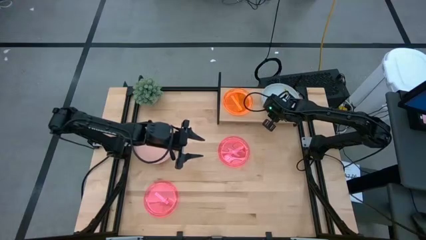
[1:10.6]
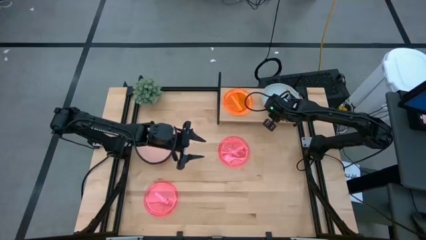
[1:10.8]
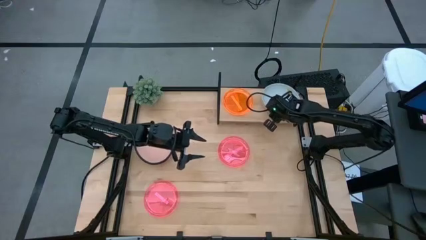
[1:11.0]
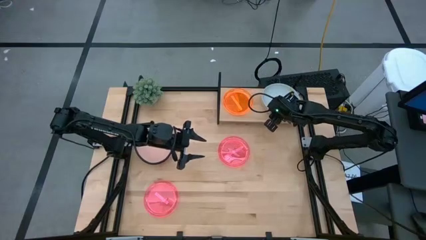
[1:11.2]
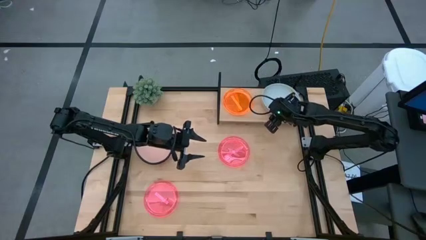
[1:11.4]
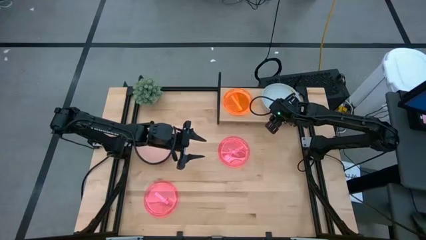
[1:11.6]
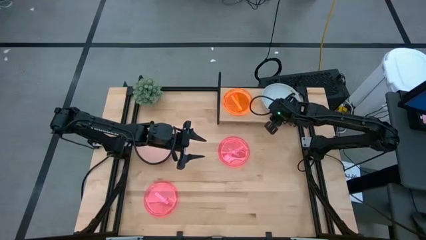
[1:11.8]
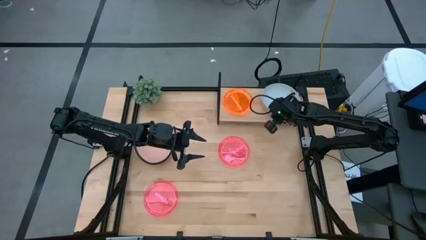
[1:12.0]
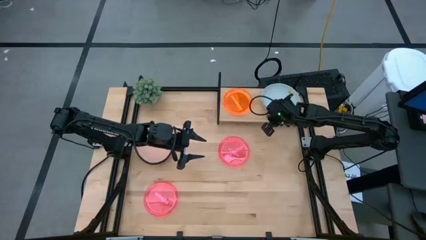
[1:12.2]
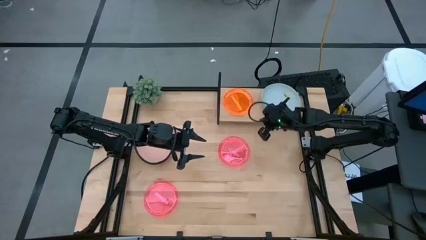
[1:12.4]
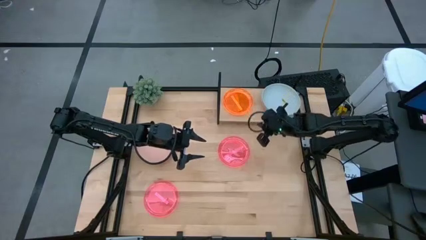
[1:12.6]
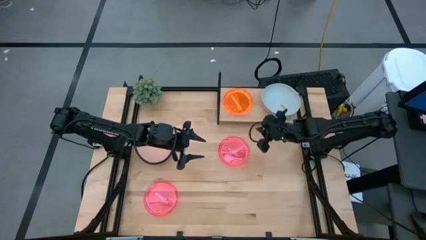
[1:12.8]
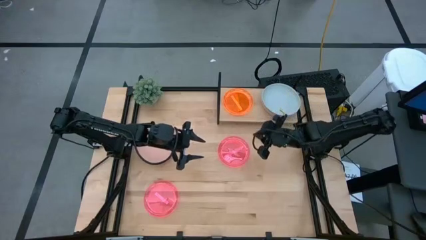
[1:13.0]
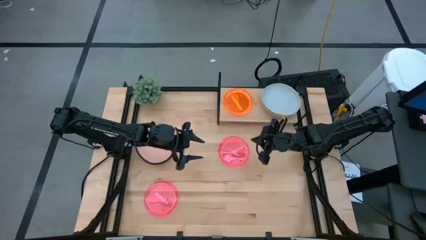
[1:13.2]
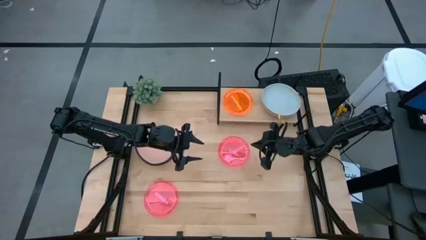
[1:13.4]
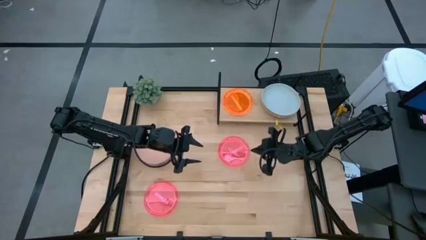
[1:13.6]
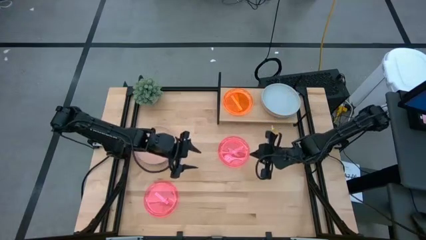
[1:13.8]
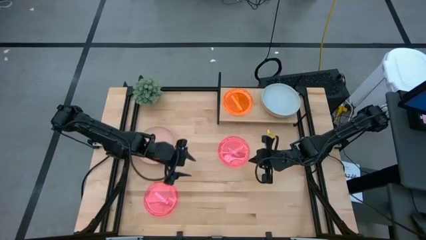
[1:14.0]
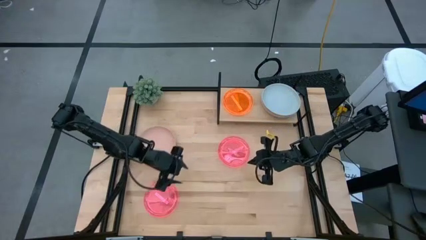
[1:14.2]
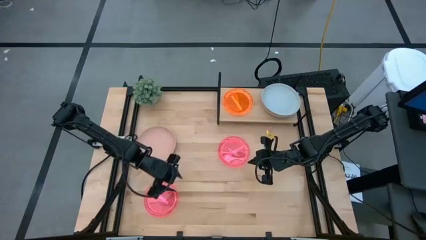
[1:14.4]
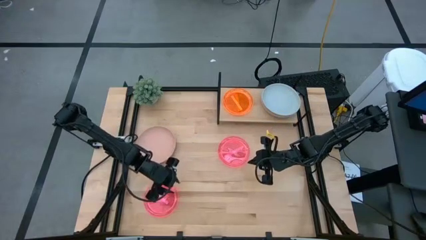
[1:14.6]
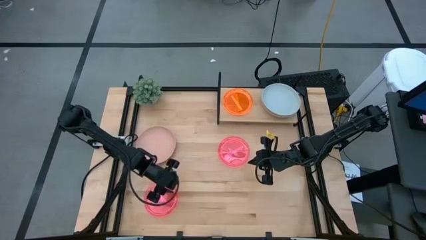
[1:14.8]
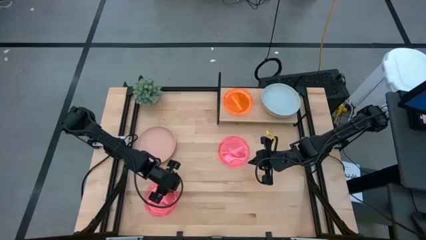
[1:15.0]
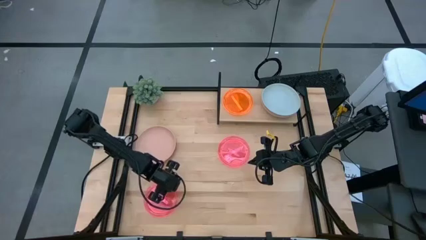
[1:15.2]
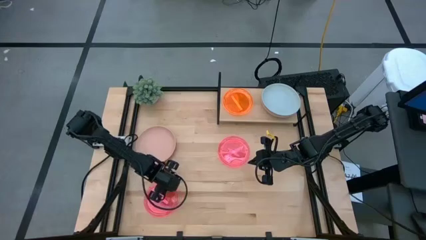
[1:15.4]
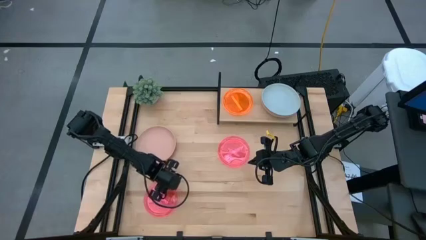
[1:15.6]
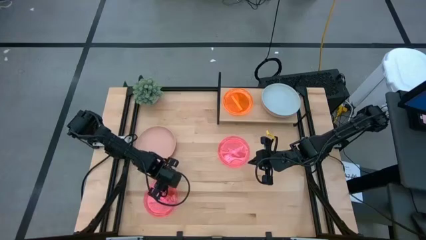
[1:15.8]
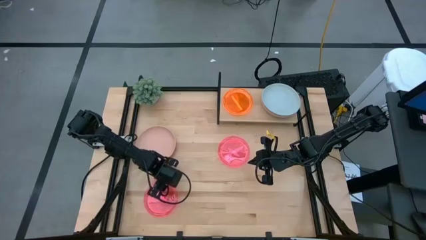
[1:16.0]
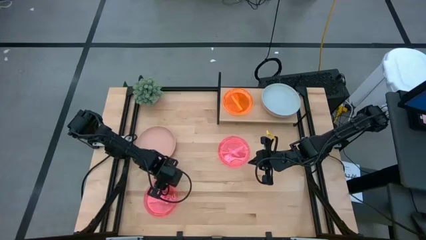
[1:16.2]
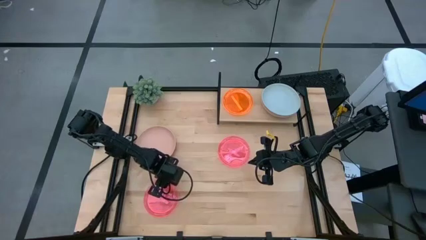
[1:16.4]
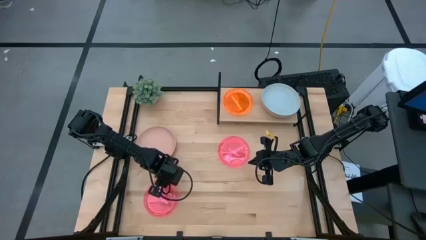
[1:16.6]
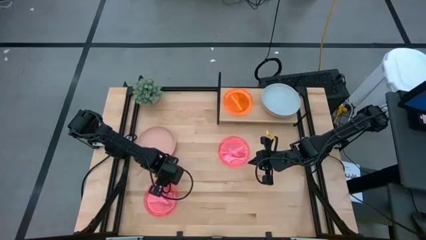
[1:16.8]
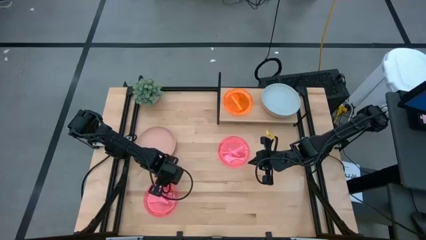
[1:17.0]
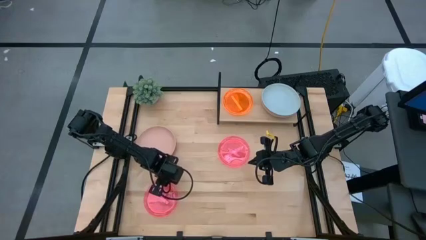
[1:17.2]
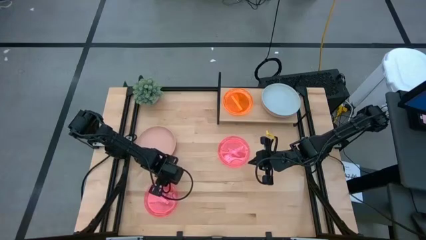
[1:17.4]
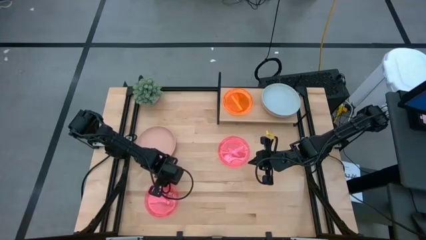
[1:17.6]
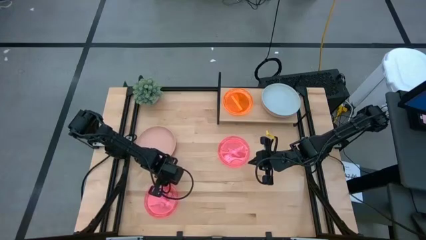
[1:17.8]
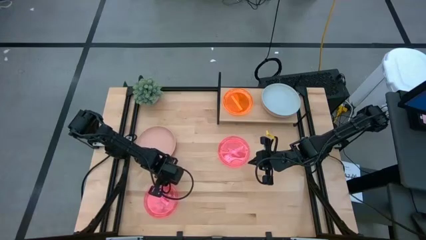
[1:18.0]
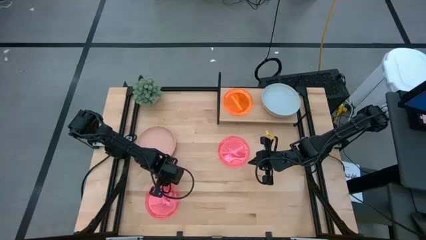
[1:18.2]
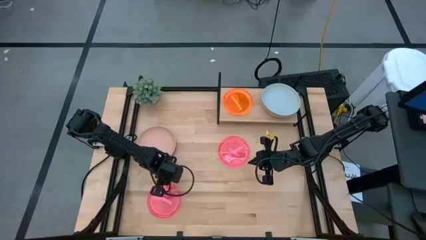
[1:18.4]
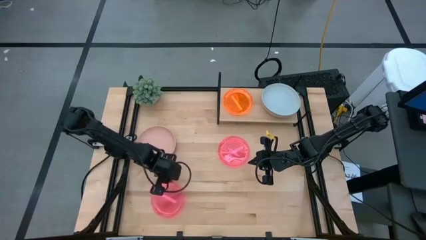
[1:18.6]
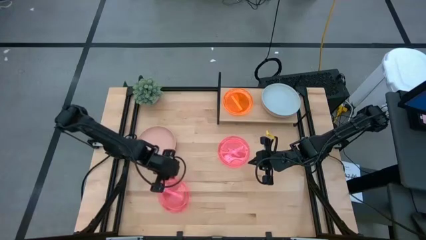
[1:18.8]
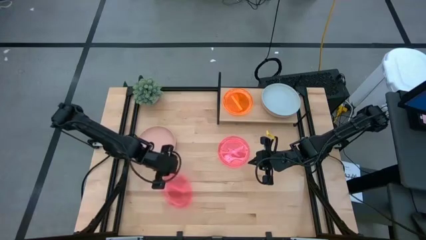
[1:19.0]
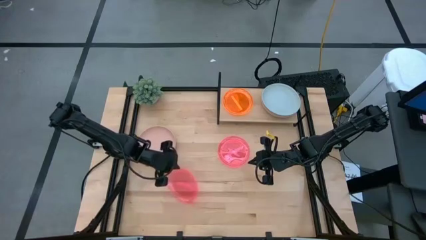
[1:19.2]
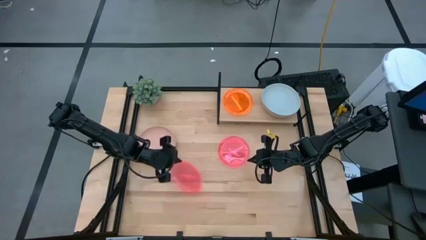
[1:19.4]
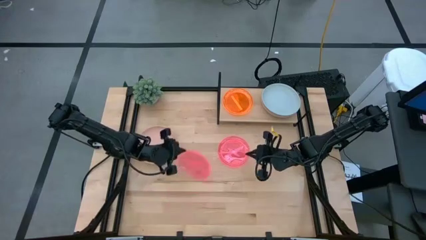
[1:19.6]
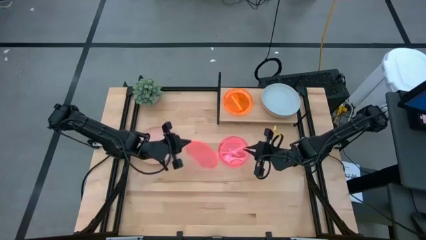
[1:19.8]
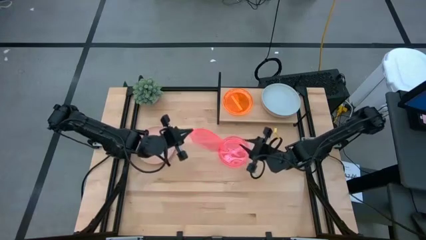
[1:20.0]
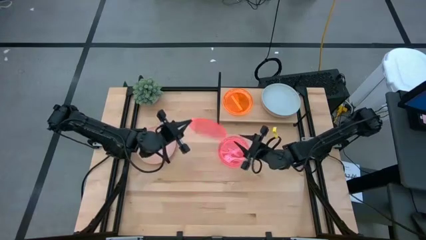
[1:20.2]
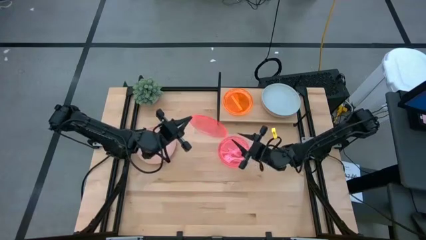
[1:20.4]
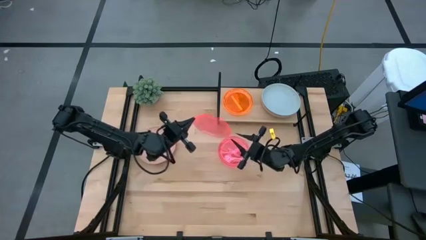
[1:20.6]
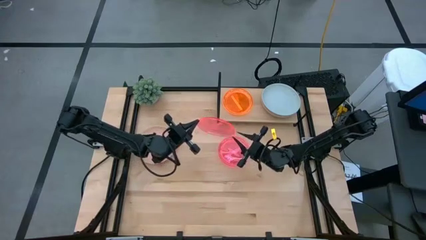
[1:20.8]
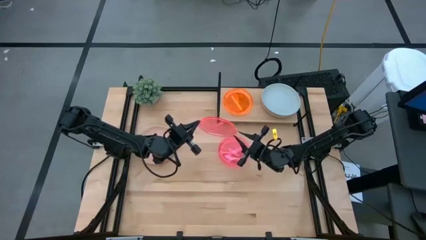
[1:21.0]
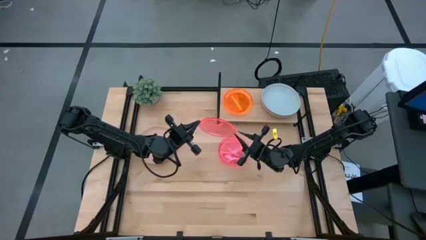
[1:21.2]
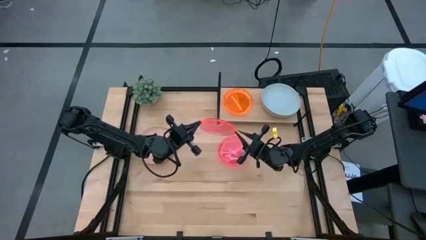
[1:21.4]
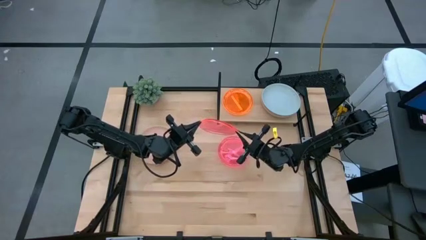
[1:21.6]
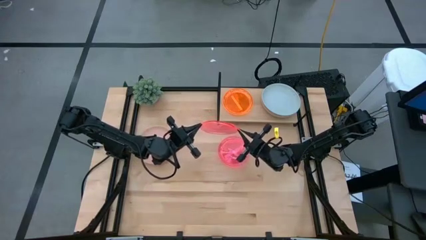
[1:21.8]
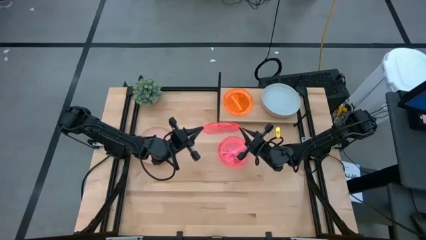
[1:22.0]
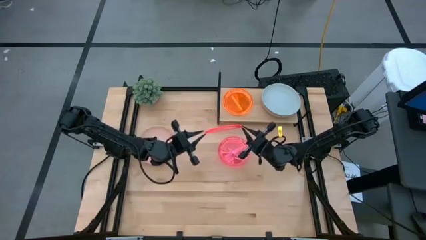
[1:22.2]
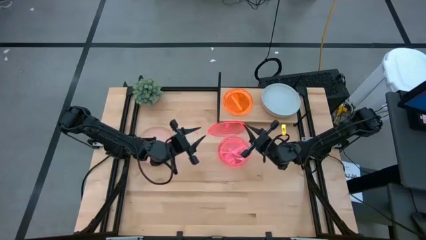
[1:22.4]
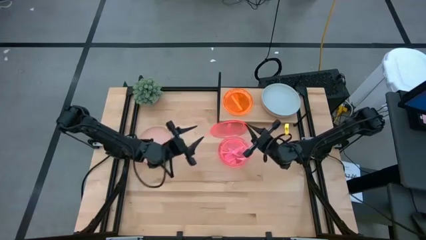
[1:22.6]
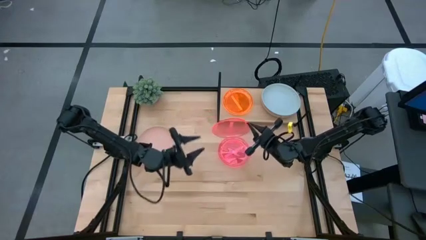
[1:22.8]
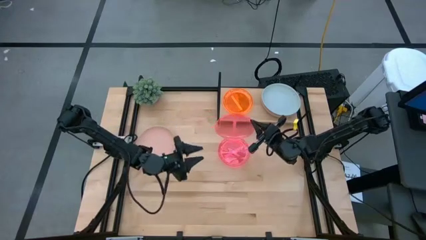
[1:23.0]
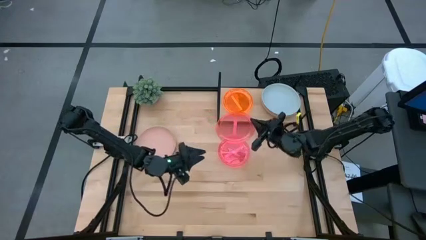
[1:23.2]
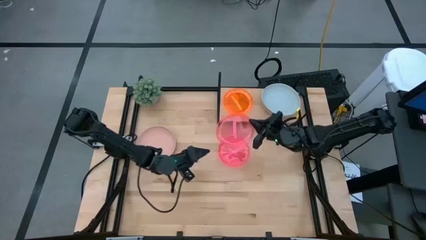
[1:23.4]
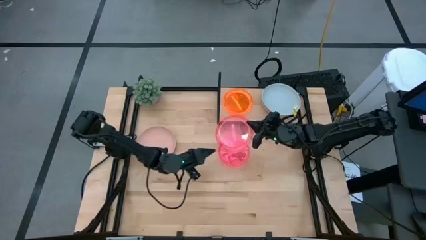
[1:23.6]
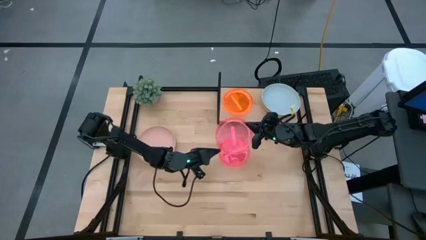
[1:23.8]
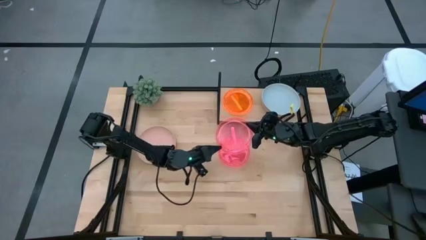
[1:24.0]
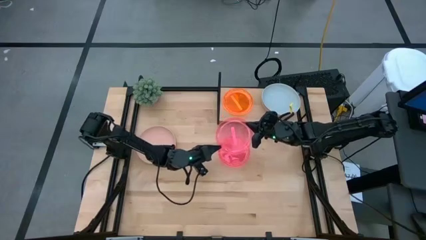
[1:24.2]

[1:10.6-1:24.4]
Task: Place and stack plates onto a shelf
Stack the bottom pink plate on top of the orange plate on the shelf

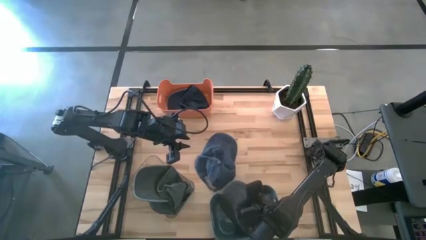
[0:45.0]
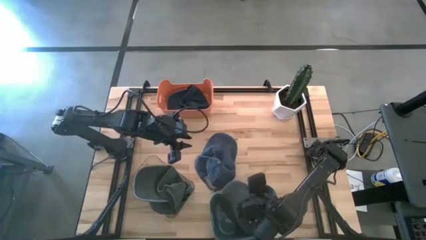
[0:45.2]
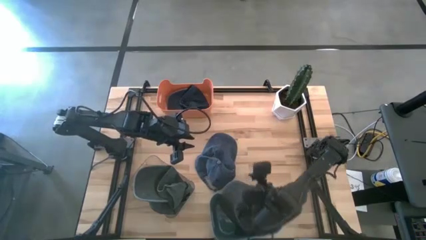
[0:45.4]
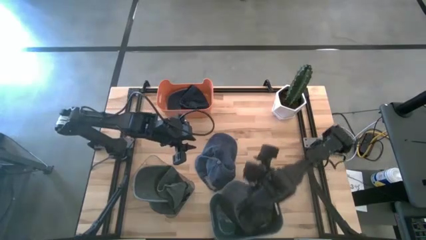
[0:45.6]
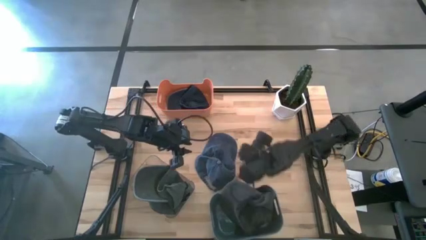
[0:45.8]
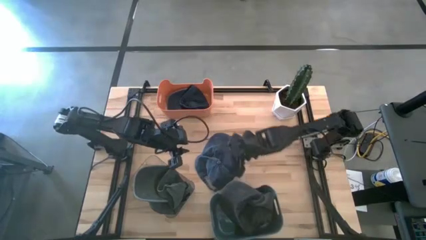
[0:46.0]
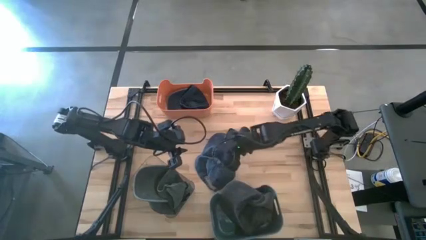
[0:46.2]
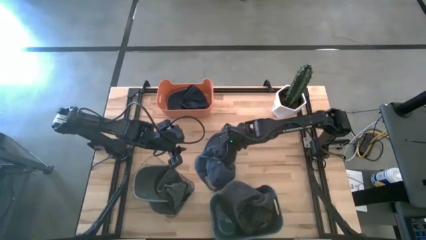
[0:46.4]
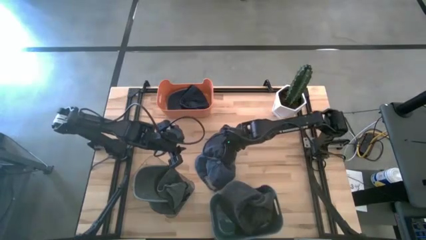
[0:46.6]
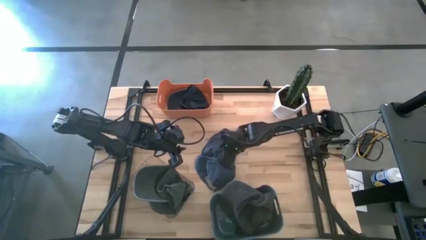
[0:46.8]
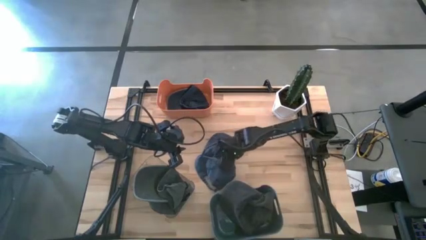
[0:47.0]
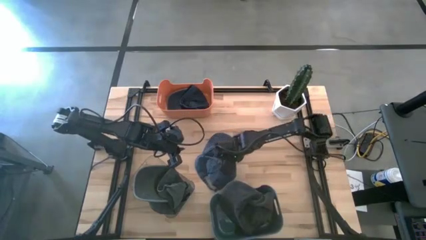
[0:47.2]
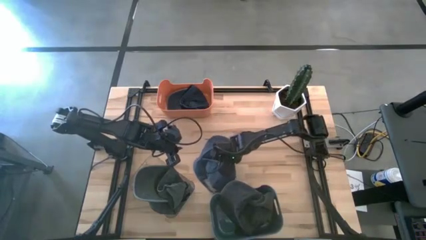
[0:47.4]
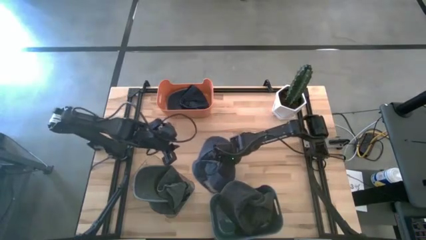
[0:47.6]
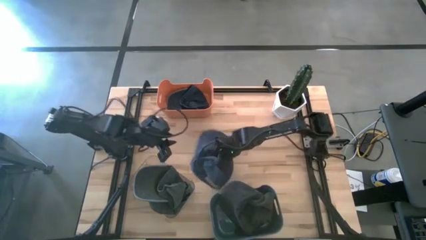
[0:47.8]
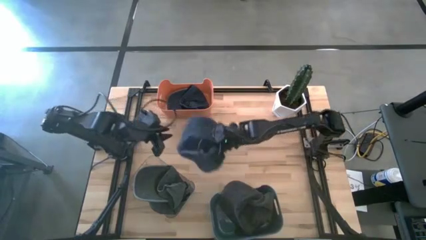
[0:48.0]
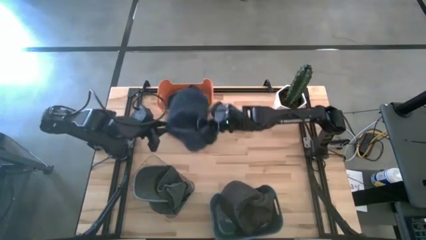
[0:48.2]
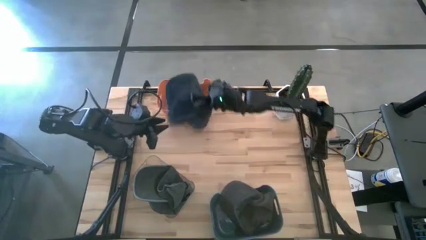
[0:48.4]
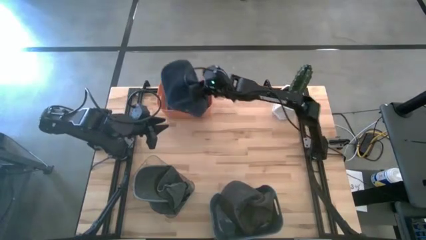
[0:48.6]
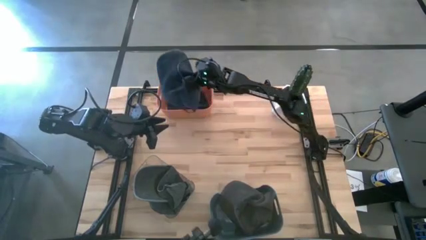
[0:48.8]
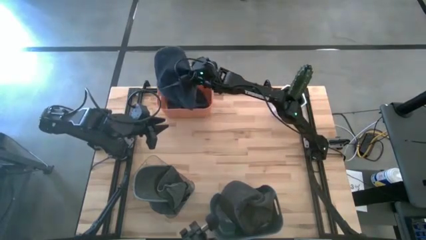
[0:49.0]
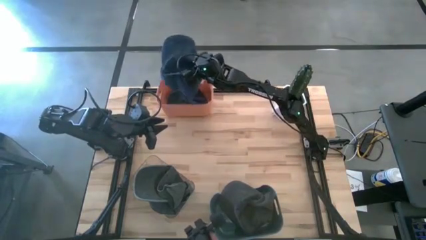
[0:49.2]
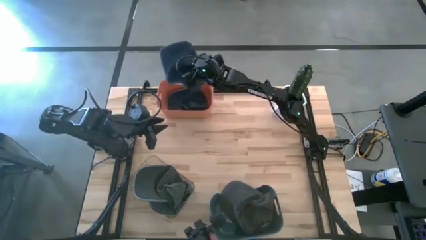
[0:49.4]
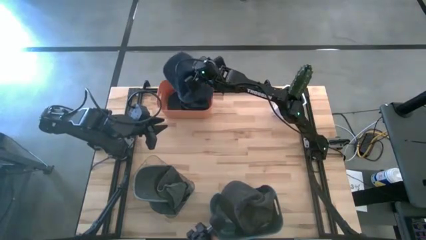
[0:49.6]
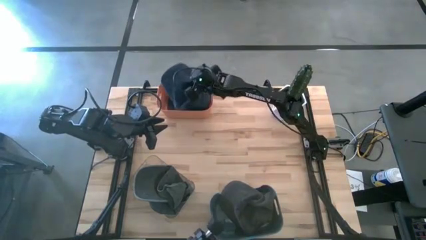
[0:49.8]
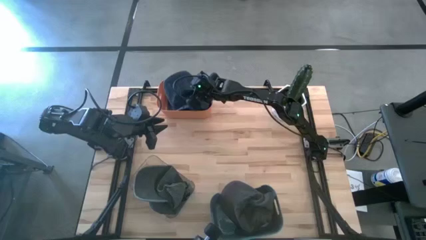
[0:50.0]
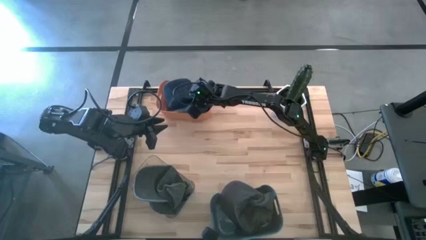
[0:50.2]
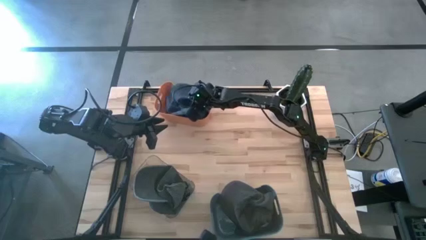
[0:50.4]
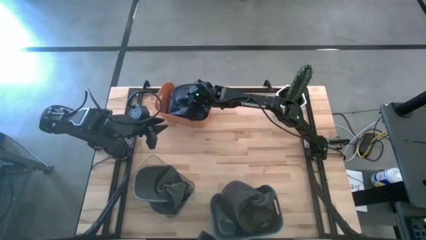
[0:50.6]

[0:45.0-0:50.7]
Task: Pick & Place hat
Put the blue cap into the orange bin
